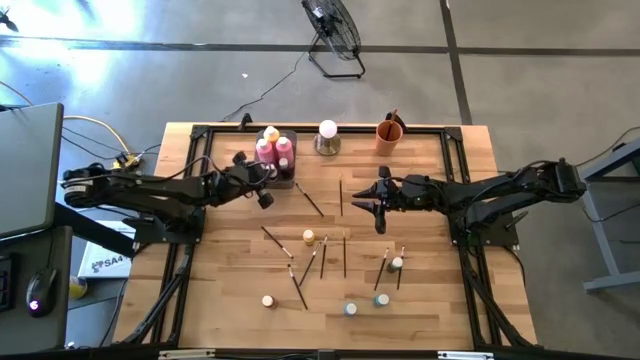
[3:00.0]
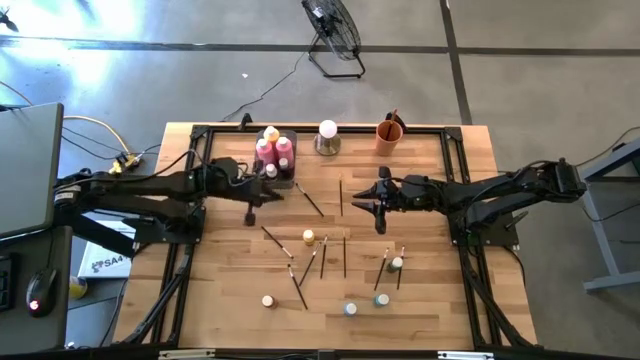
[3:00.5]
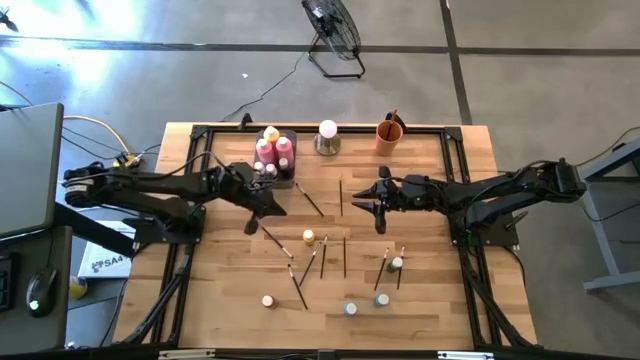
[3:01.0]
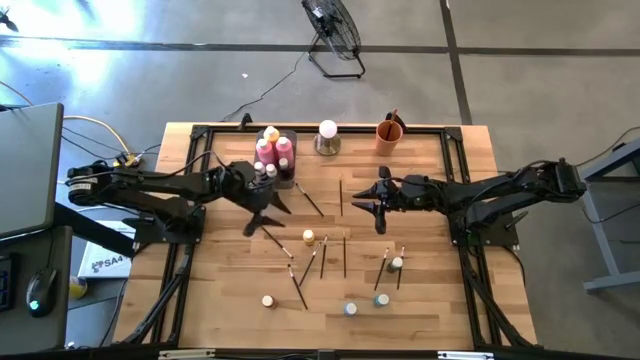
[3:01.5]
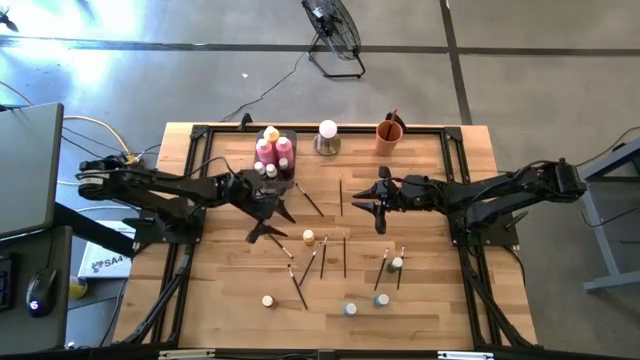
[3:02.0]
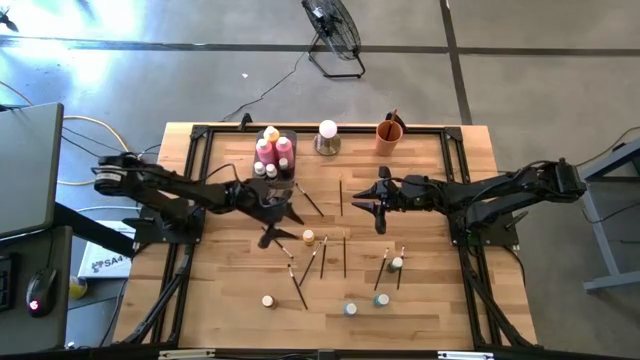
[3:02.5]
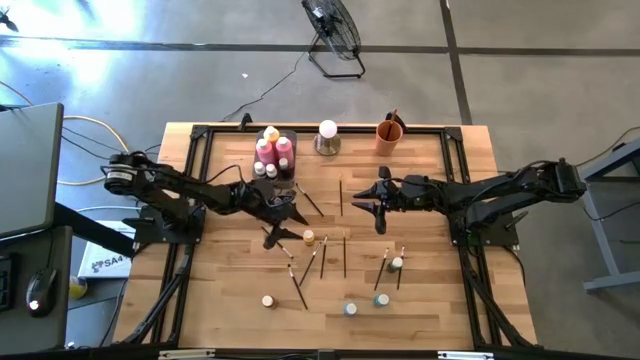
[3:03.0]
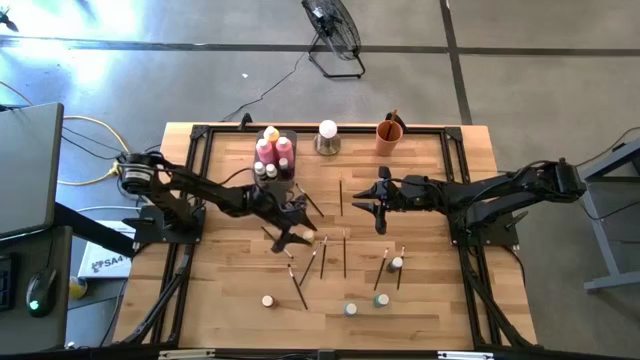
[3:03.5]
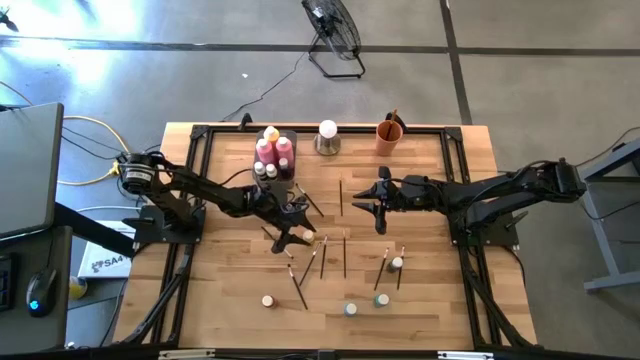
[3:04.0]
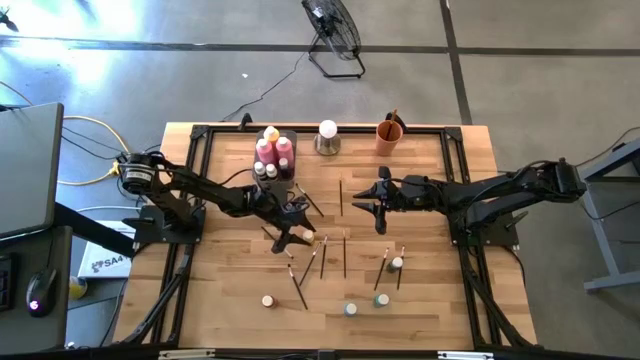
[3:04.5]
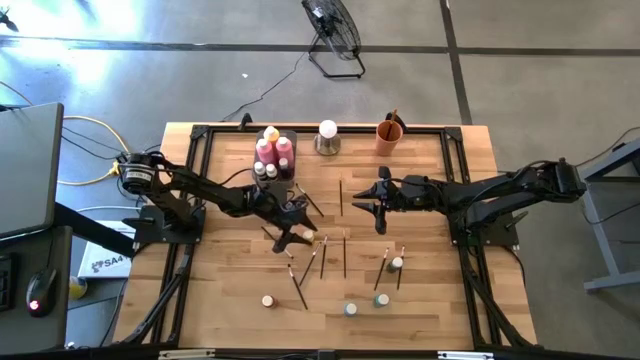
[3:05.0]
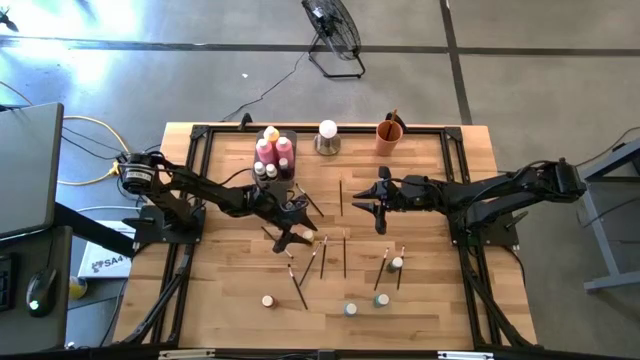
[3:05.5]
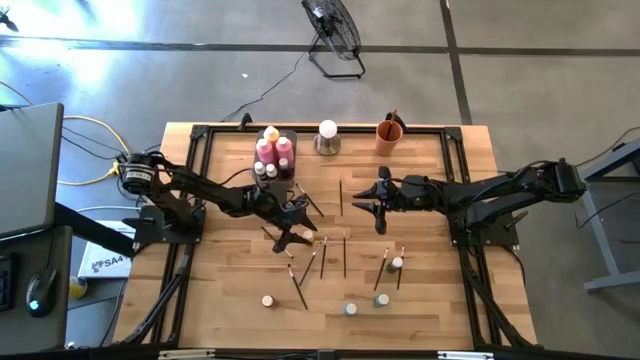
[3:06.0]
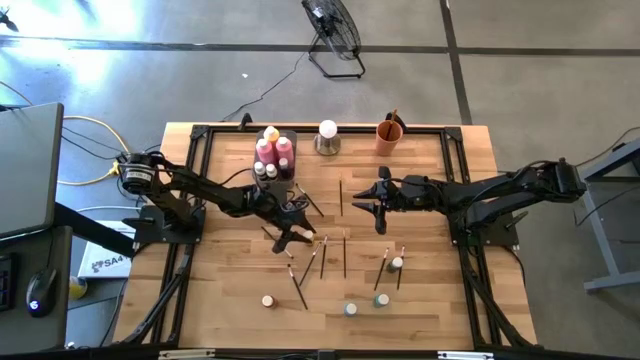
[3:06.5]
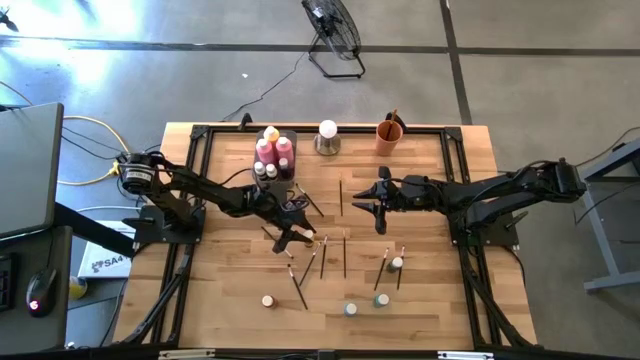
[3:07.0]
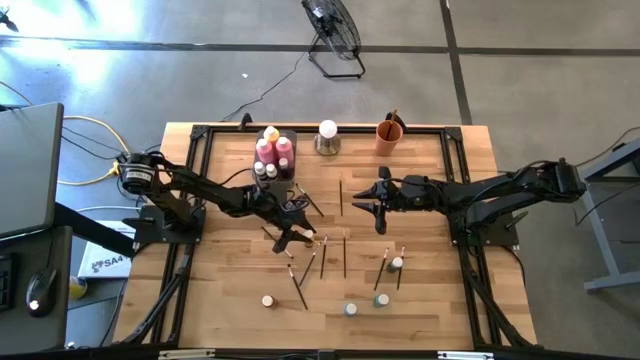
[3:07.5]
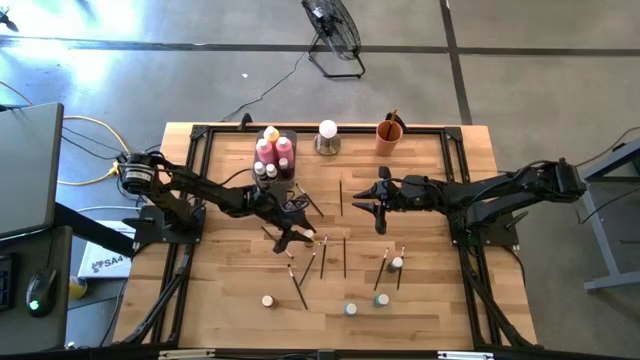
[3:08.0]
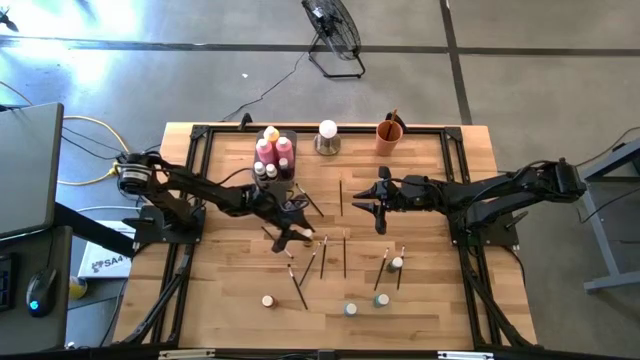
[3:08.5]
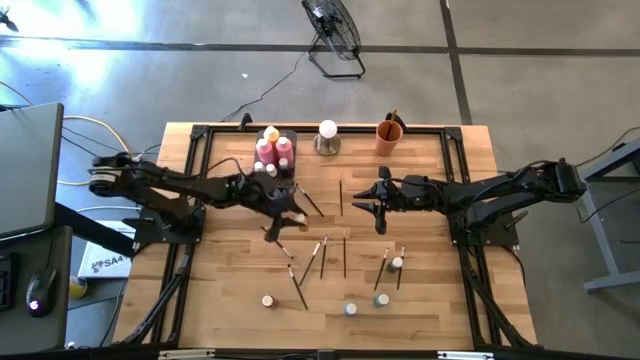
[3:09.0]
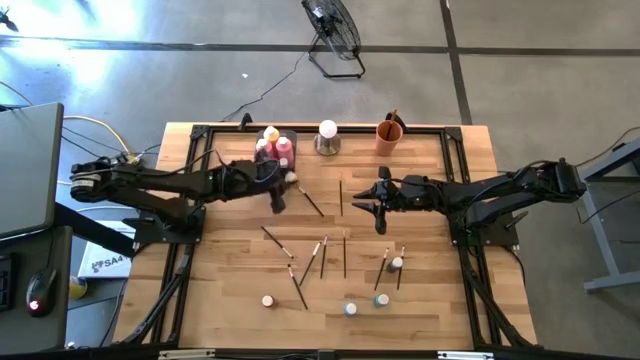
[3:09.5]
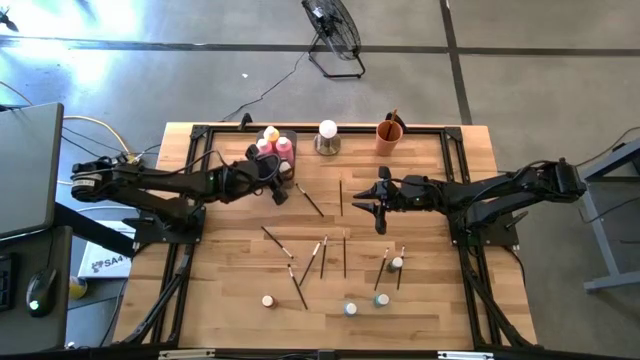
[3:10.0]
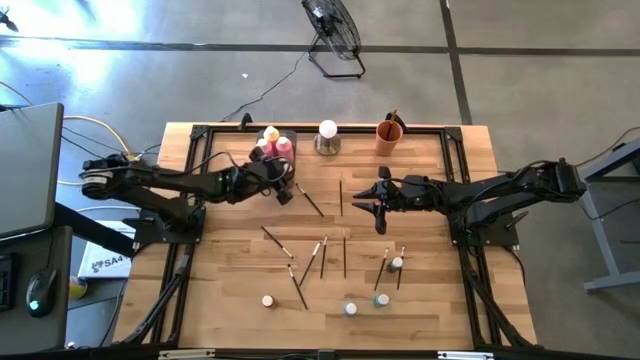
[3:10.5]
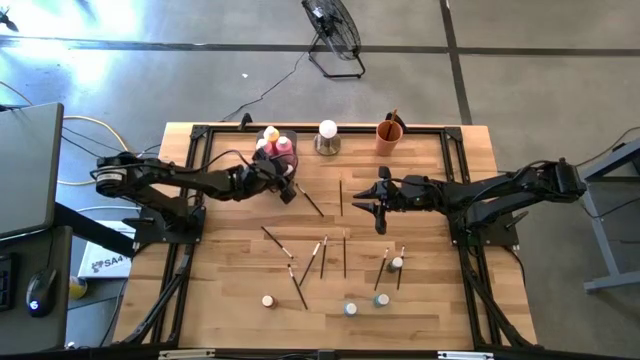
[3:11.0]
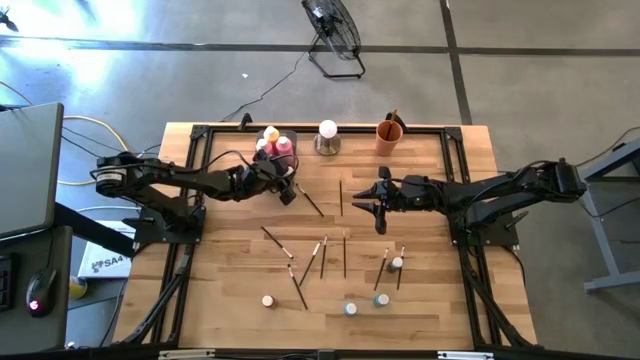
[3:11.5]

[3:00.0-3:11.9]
Task: Pick & Place Paint Supplies
Put the small yellow paint bottle into the gray bin

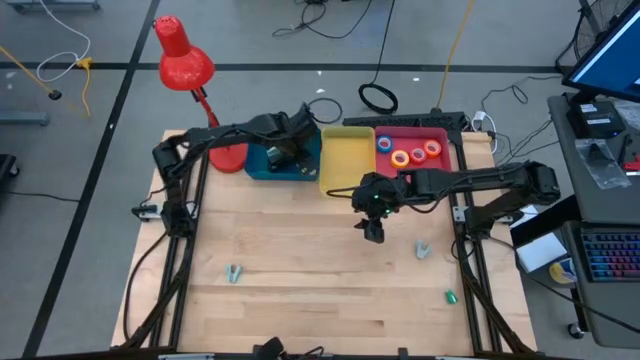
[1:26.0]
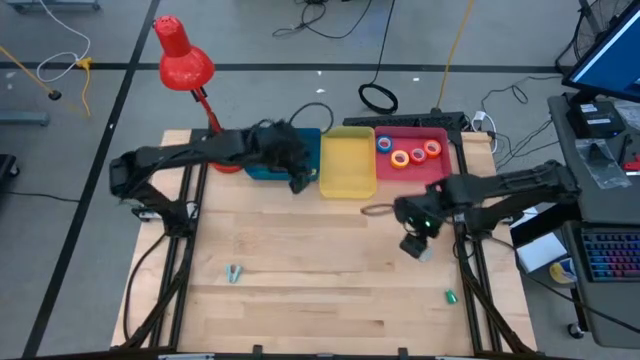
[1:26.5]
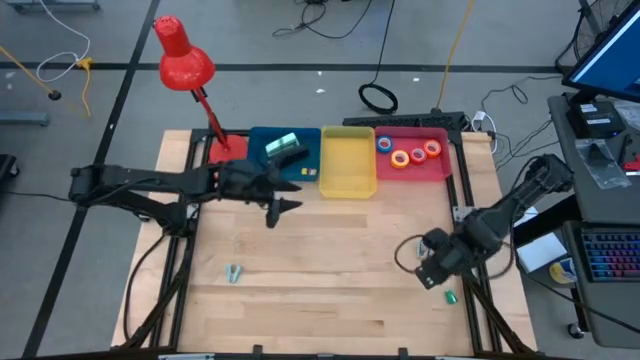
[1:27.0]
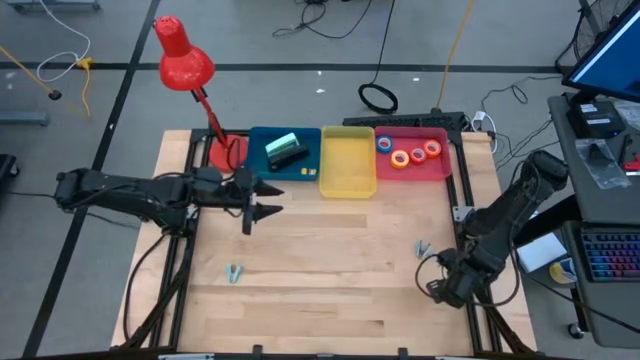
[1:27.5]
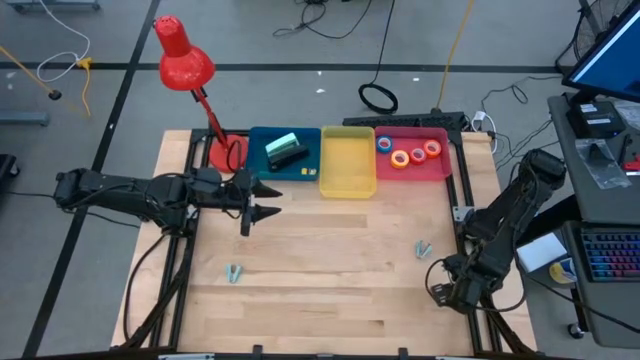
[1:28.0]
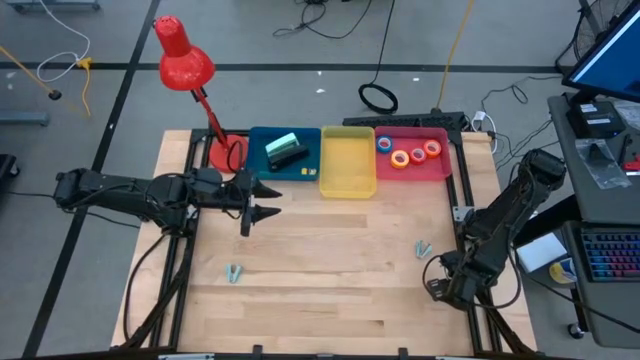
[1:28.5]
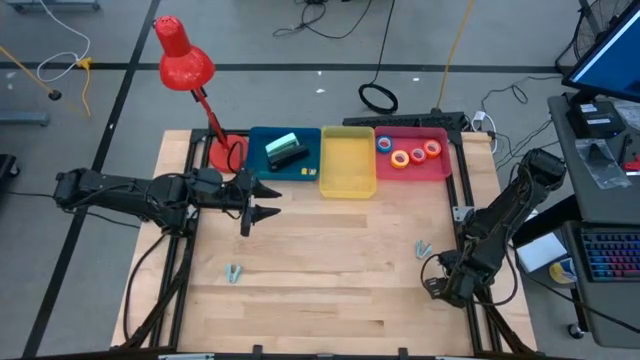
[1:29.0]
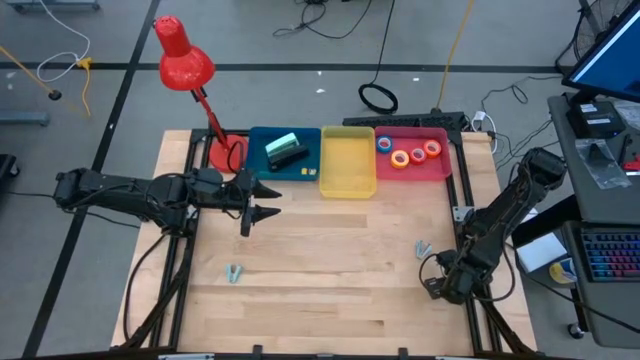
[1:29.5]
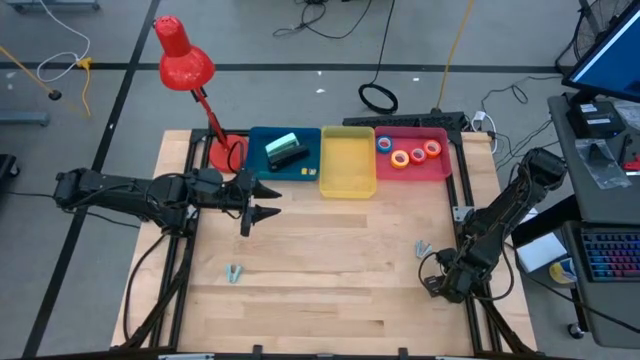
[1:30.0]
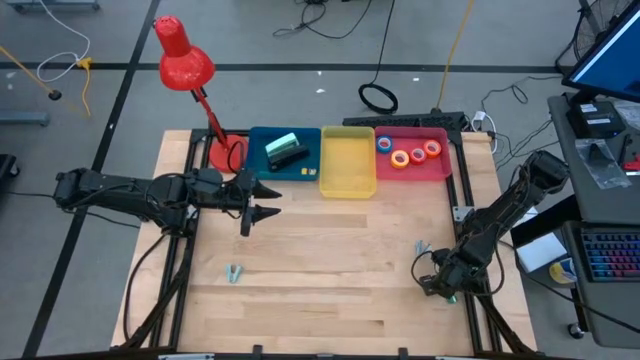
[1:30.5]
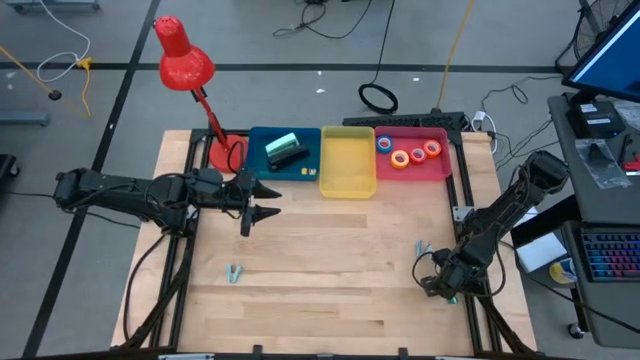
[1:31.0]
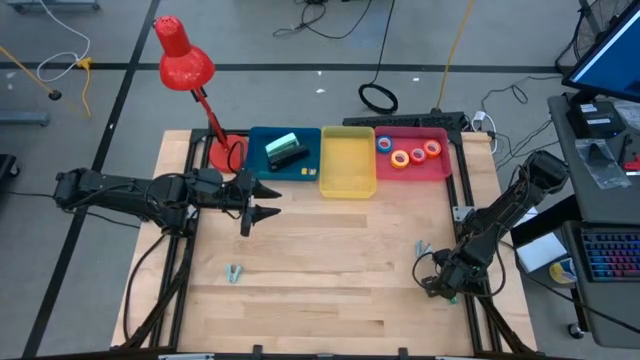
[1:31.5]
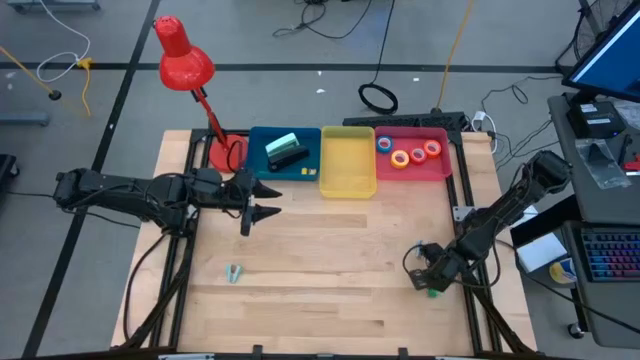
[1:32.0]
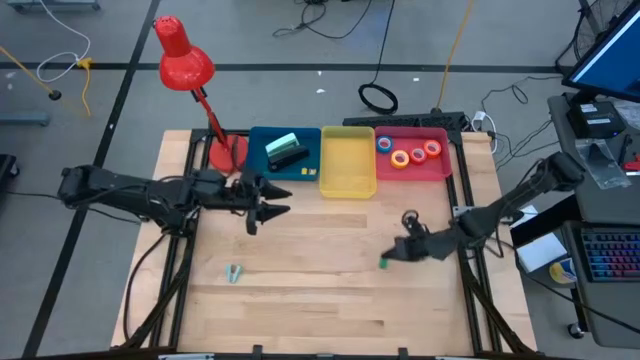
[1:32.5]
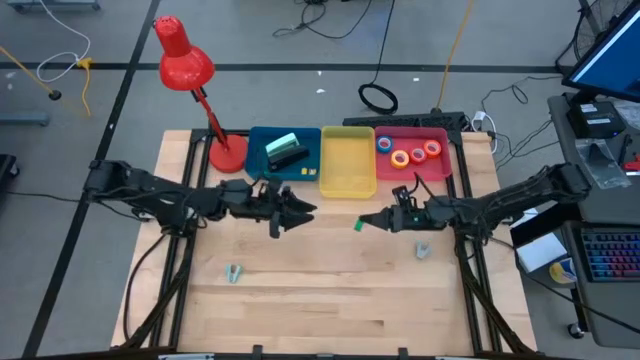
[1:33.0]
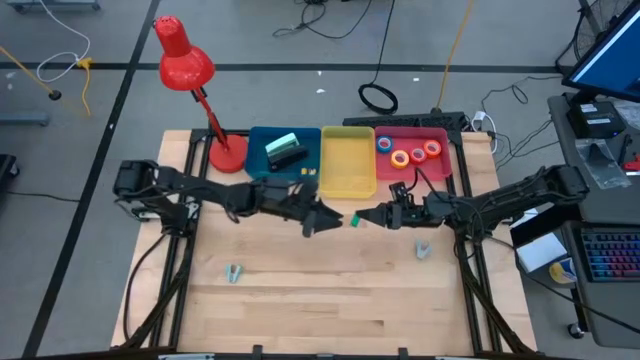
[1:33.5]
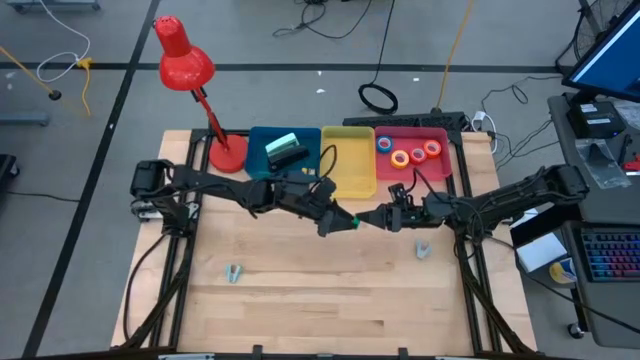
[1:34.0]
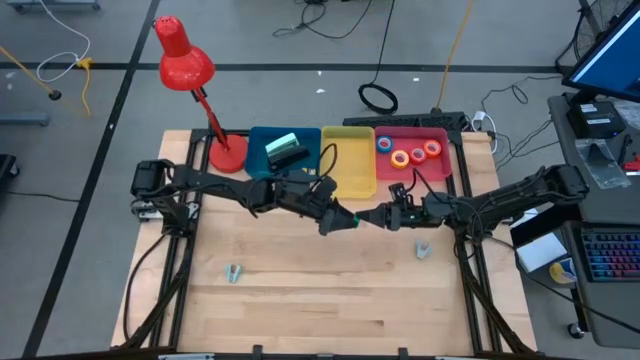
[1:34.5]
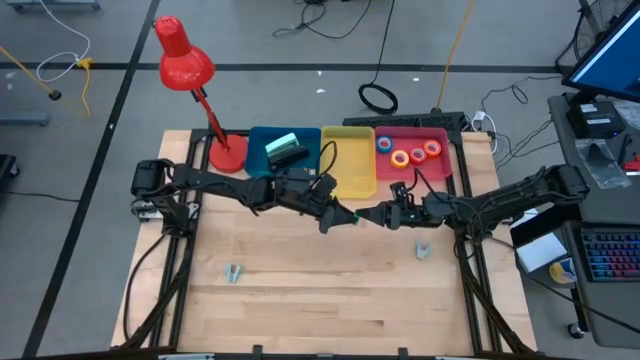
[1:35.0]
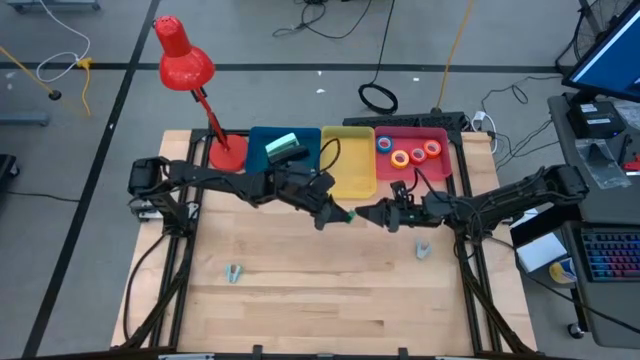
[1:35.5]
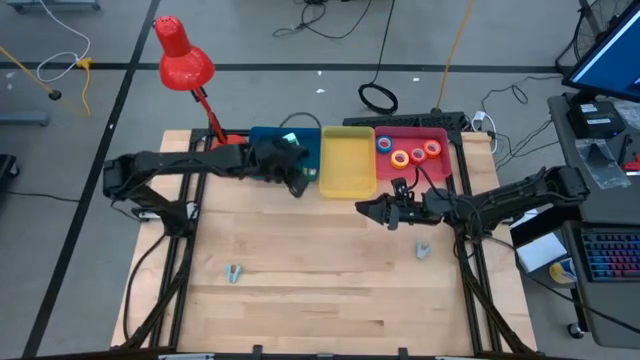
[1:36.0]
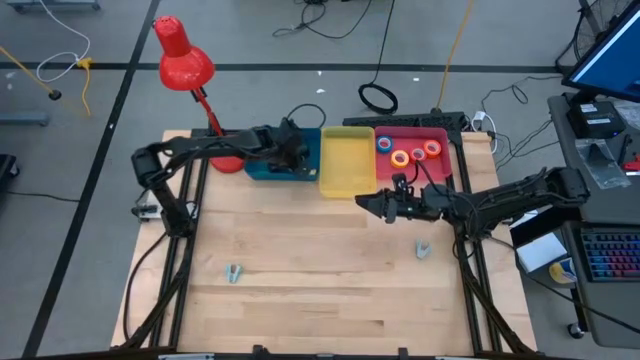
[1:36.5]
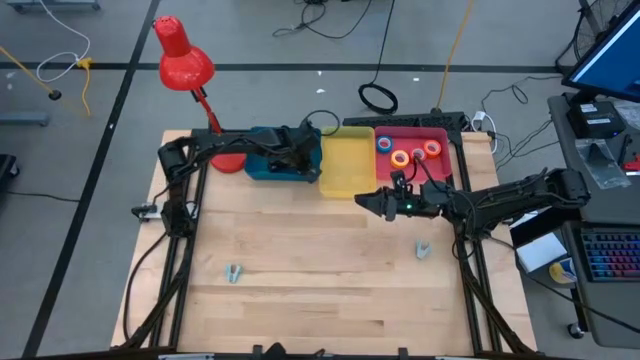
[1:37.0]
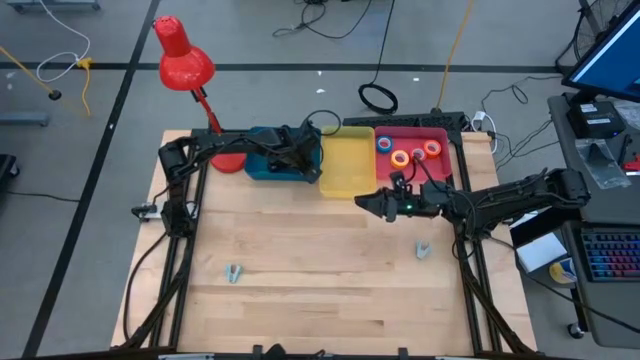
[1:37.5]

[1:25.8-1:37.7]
Task: Pick and place Stapler, Stapler remover, tape
Put the small green stapler into the blue bin
